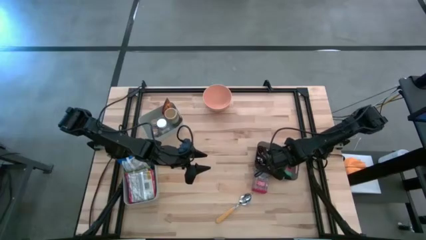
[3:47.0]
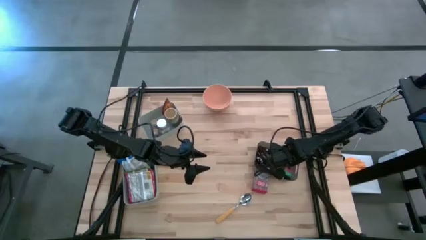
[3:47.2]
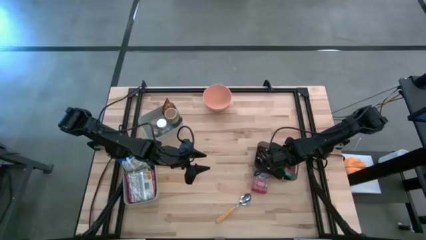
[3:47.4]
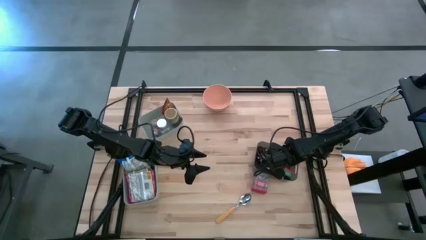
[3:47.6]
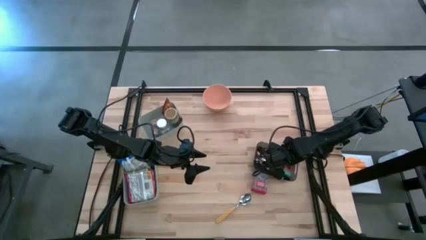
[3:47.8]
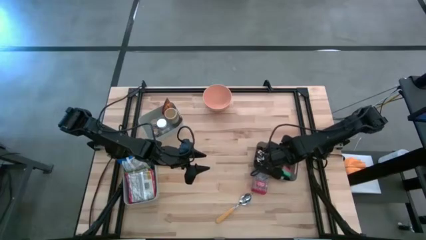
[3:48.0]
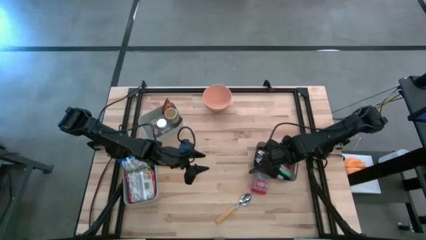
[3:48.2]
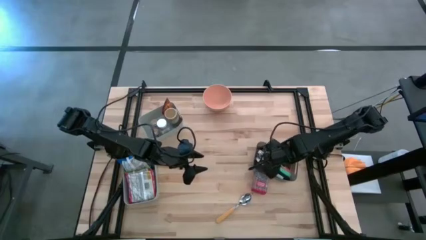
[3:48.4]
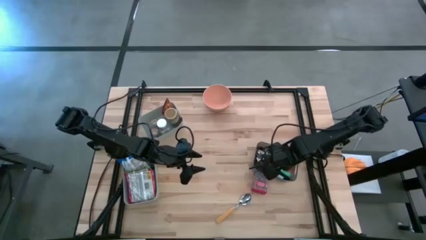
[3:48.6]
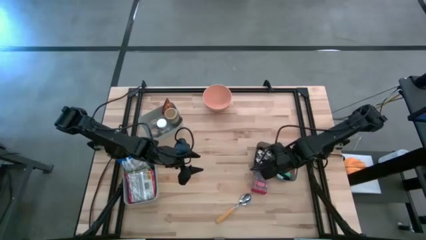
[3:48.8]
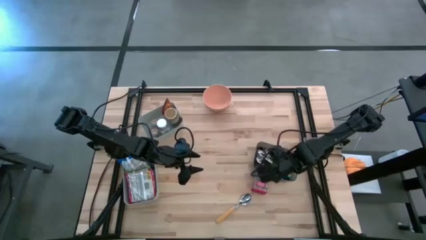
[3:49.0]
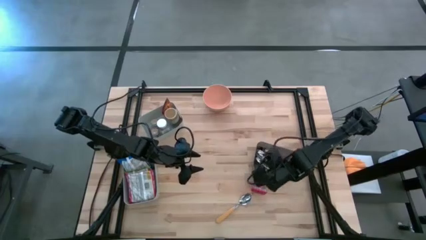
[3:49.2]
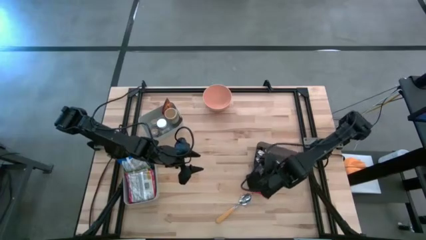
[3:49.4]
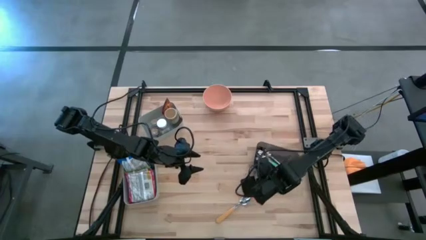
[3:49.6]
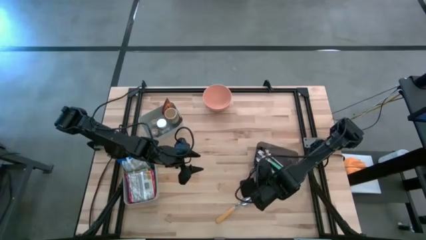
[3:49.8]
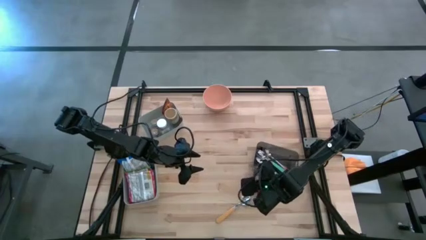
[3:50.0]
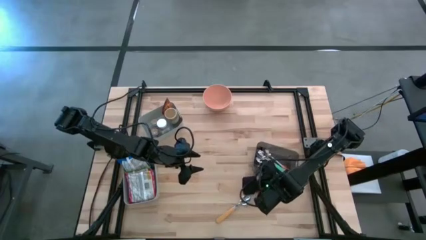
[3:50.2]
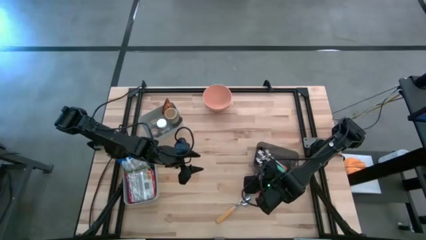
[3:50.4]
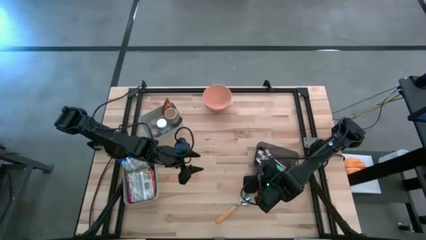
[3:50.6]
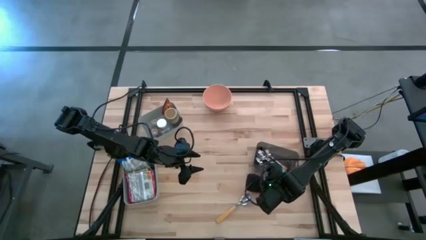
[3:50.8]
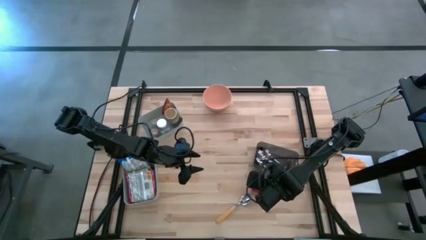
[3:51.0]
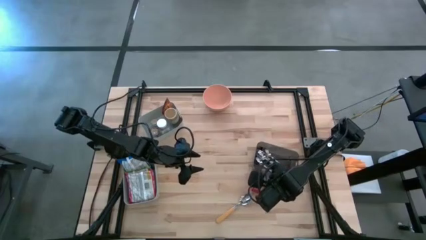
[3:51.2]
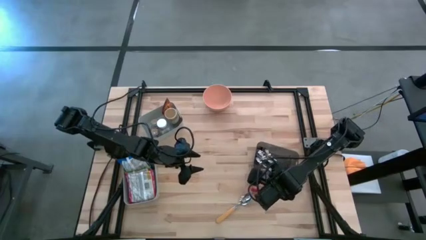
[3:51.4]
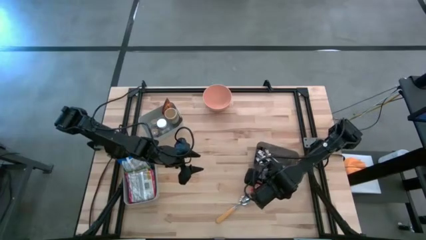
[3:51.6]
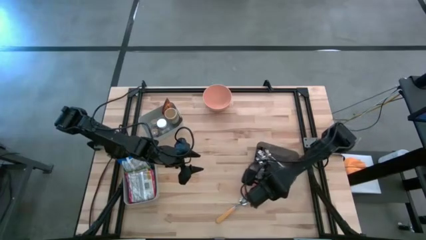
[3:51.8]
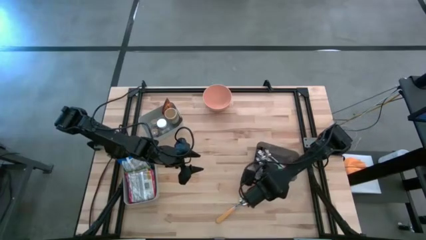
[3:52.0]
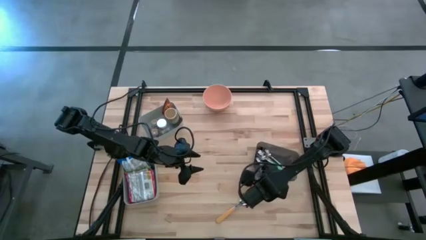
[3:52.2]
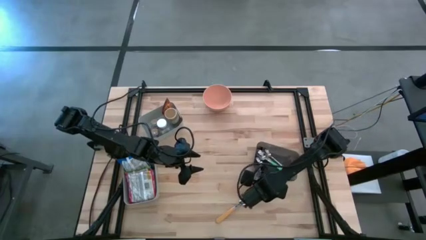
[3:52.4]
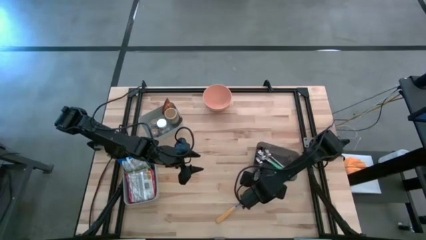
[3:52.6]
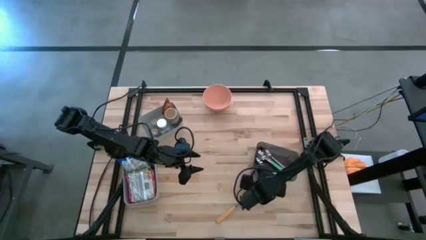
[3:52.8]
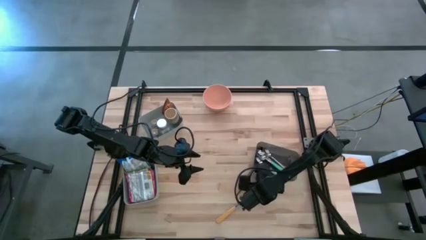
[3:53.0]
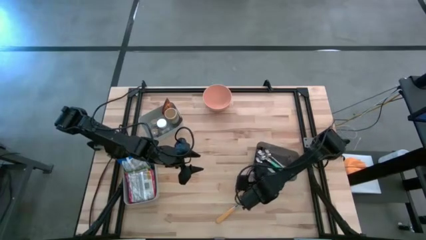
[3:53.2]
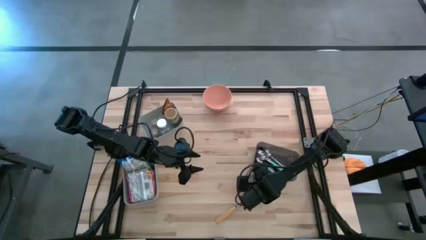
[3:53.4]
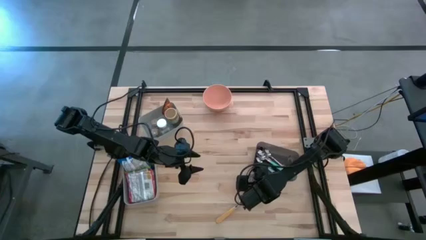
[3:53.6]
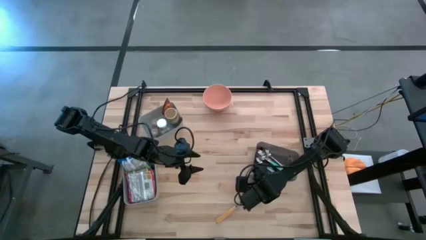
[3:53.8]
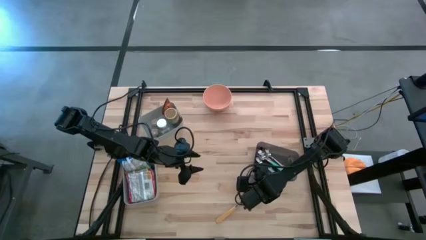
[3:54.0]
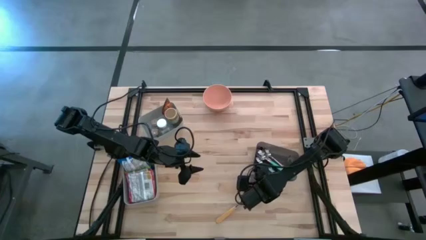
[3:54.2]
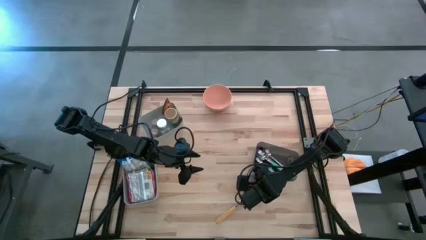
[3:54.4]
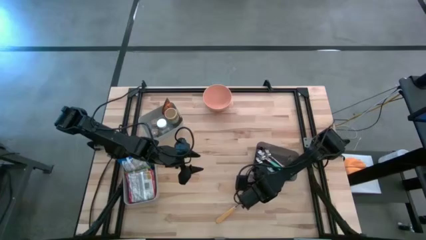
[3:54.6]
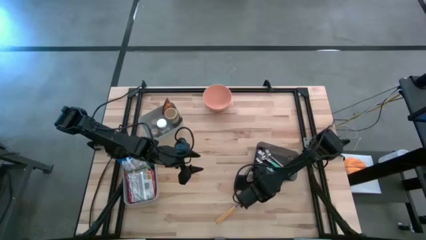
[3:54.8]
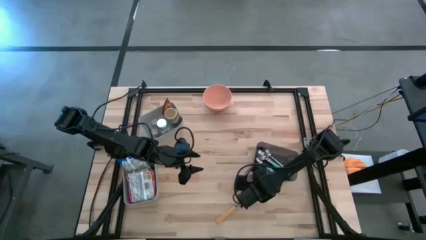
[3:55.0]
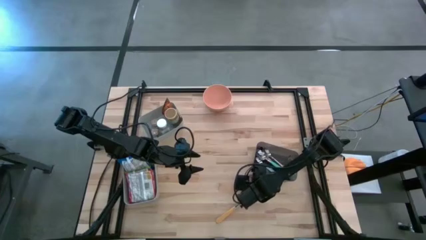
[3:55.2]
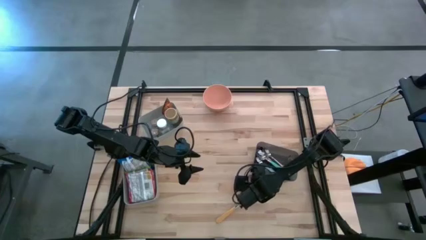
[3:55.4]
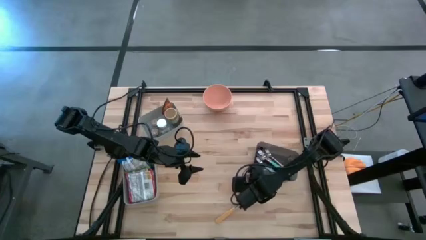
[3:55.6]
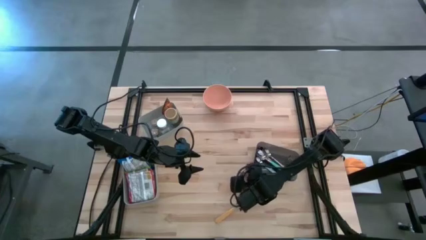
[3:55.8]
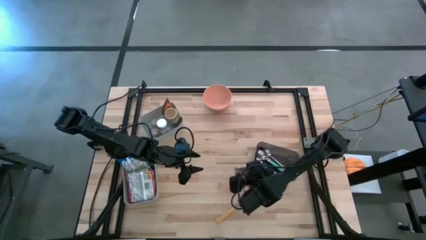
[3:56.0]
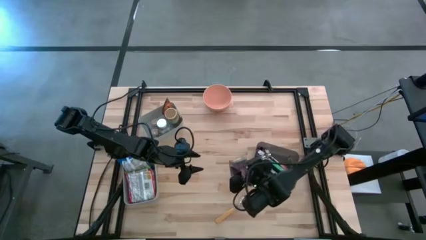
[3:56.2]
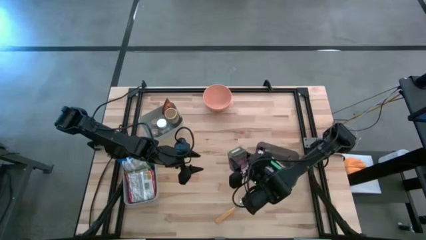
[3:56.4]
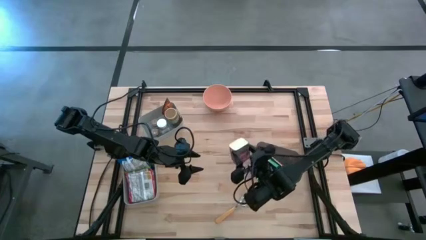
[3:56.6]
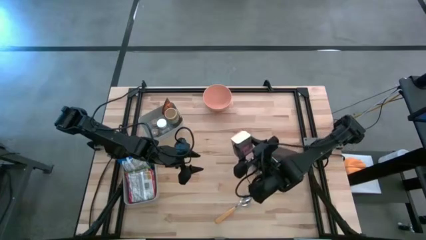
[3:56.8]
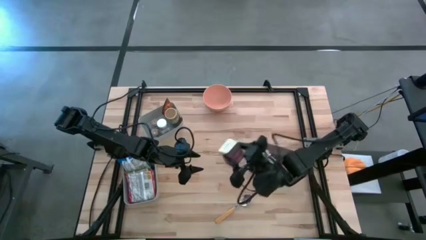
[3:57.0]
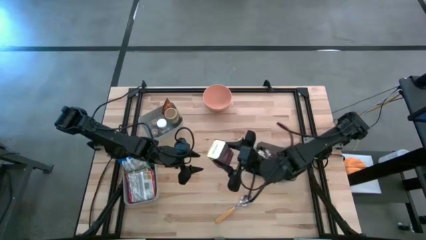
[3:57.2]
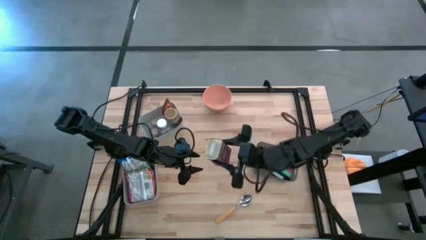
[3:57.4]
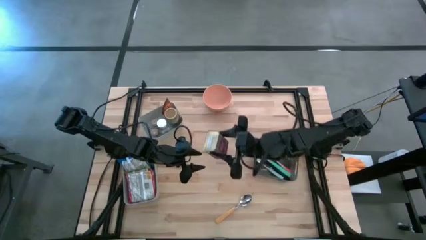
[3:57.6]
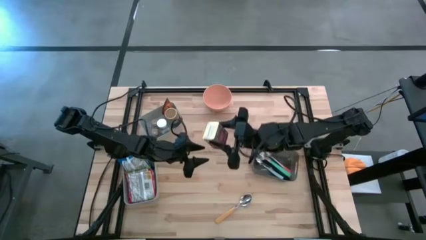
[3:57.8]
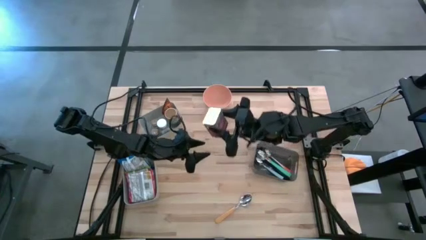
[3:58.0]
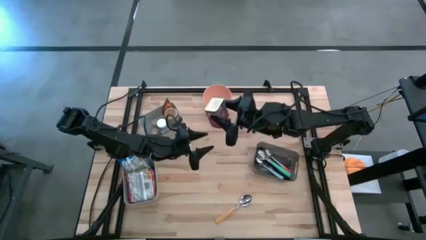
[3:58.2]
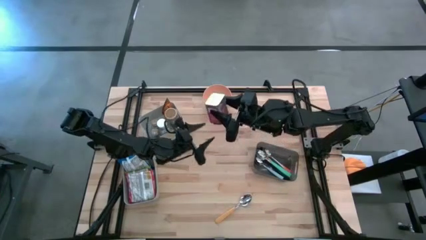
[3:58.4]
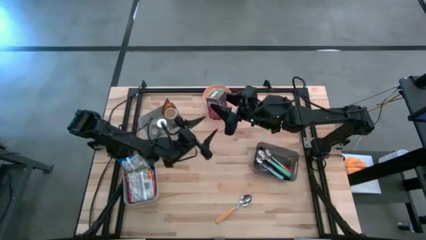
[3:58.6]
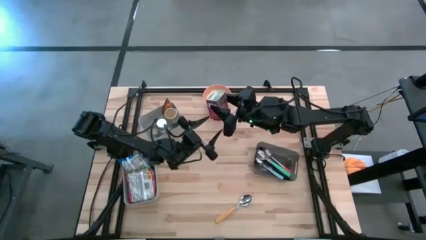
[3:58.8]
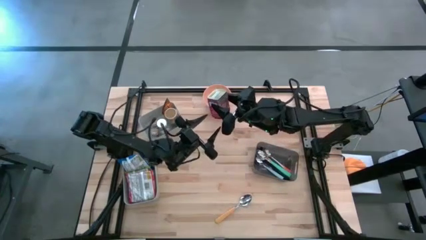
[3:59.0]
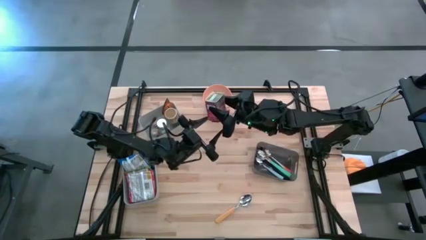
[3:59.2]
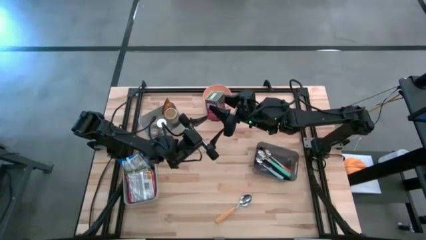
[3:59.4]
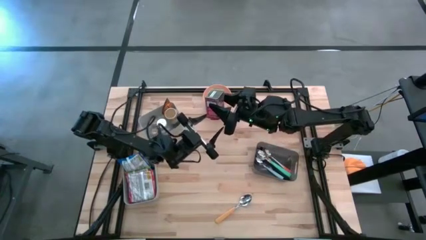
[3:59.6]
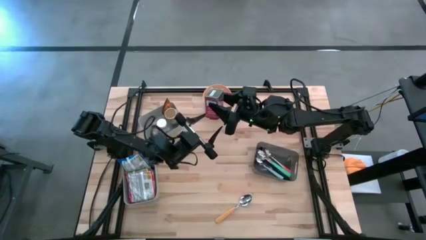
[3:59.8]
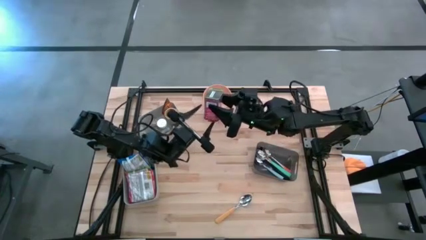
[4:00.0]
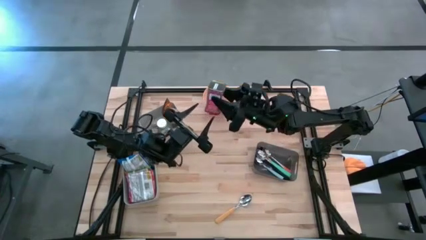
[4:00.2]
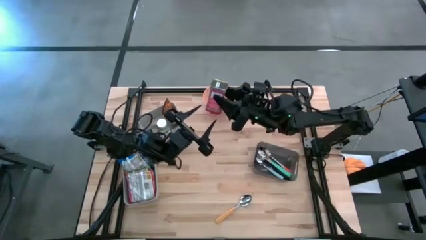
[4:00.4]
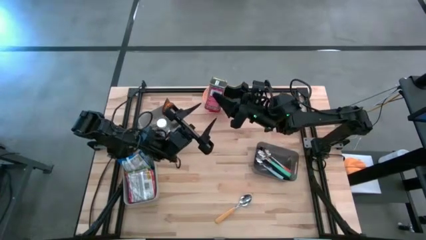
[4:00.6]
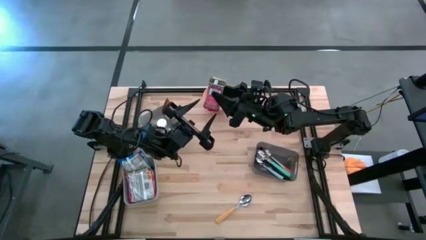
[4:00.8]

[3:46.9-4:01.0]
Put the red seasoning can into the top gray bin

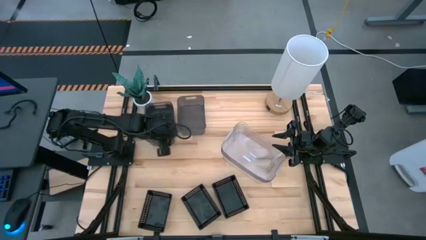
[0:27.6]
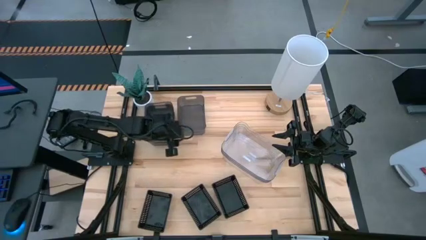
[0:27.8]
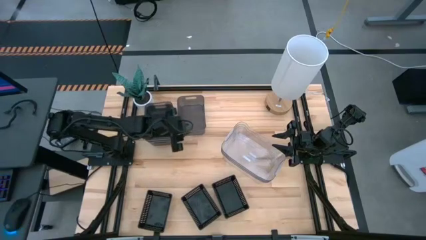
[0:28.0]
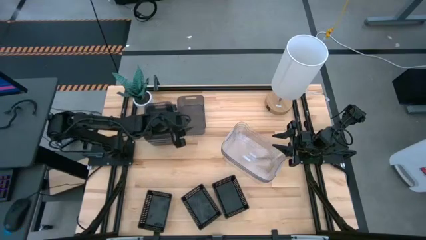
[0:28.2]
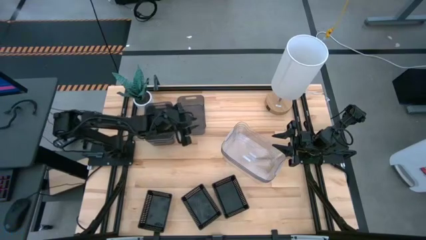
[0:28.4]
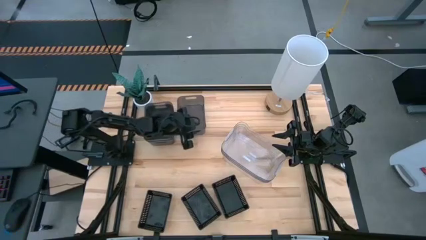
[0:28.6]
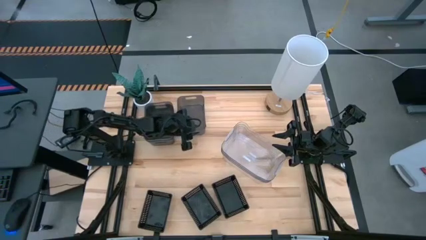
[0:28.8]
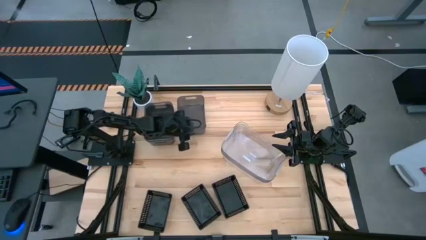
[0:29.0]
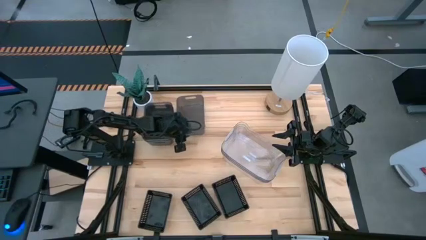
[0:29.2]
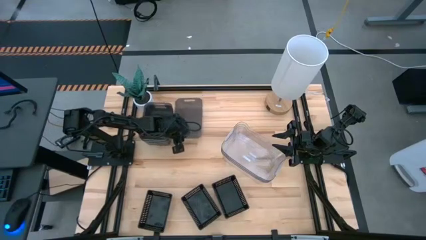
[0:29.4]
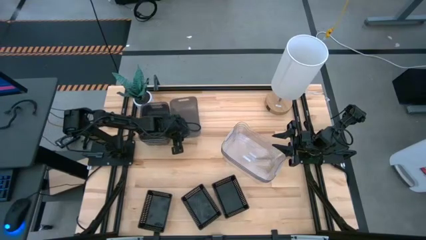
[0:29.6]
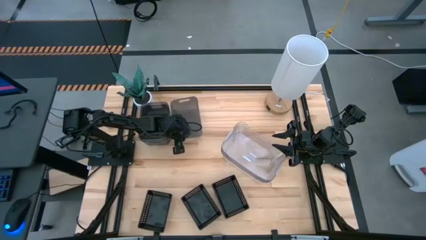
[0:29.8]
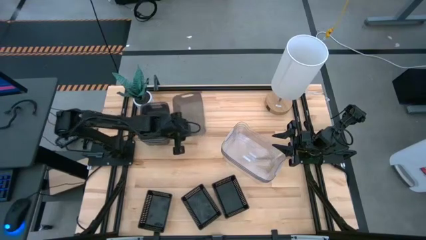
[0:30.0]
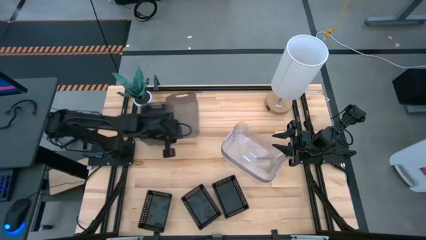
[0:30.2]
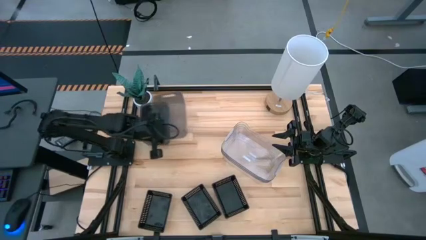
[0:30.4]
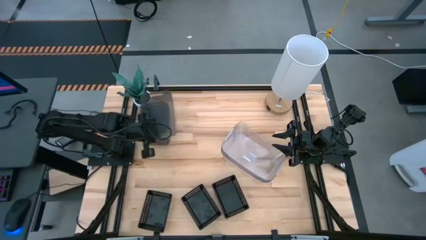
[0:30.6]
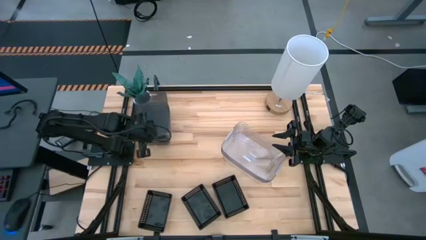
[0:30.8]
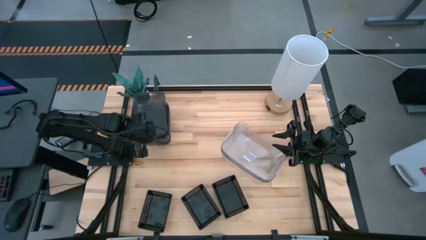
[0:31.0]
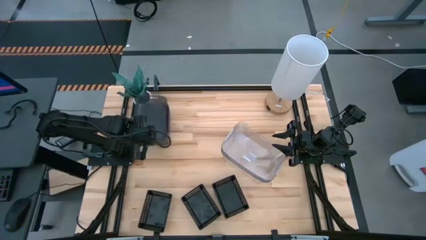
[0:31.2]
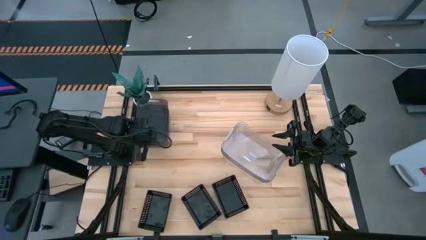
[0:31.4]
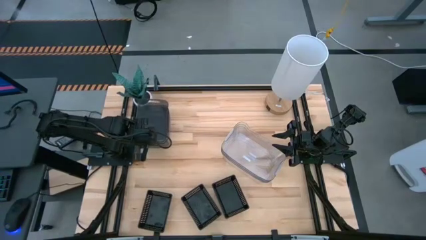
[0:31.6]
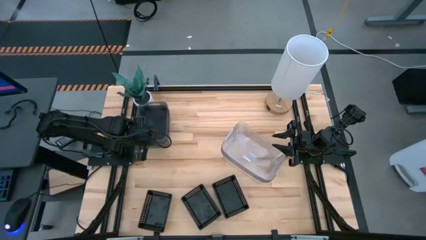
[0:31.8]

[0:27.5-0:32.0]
Stack the right black transparent bin on the left black transparent bins
